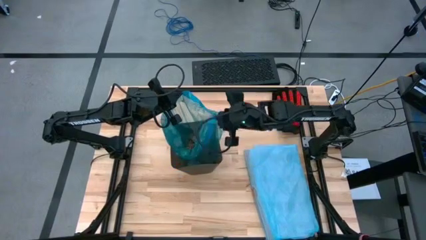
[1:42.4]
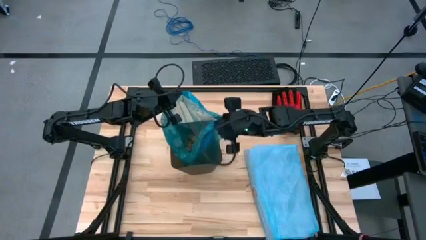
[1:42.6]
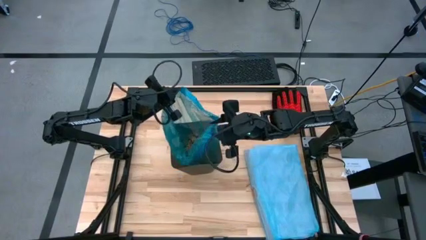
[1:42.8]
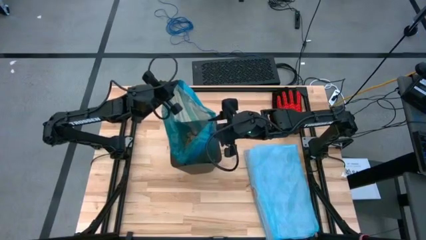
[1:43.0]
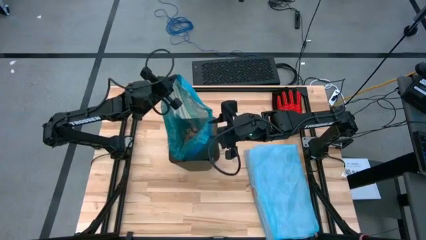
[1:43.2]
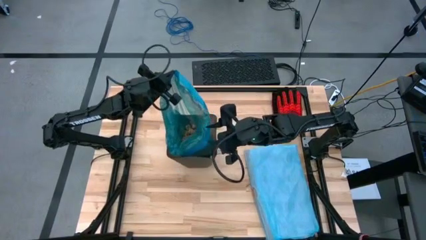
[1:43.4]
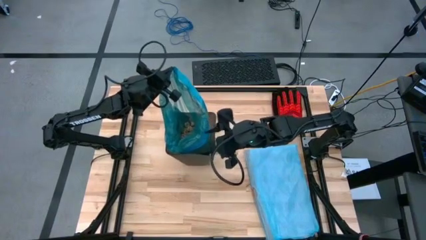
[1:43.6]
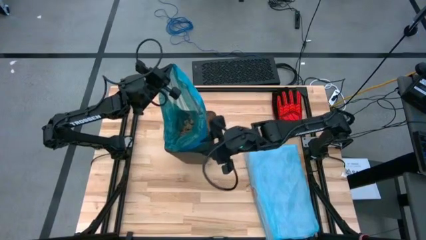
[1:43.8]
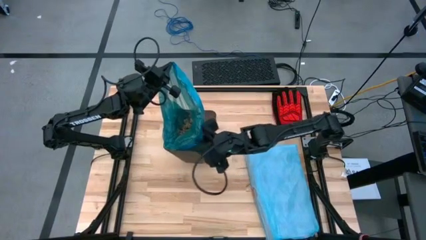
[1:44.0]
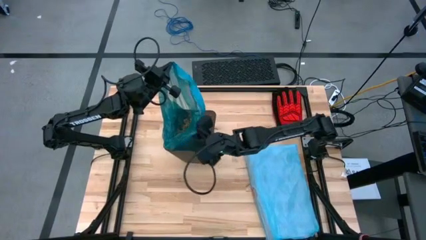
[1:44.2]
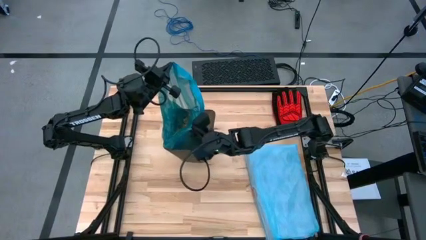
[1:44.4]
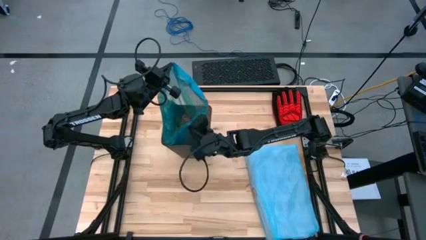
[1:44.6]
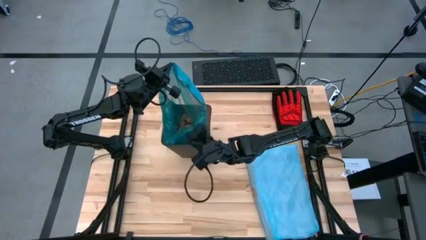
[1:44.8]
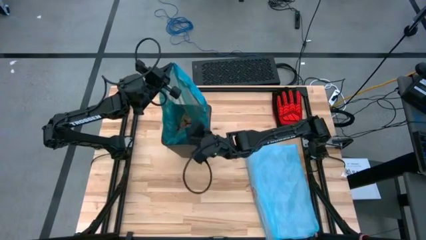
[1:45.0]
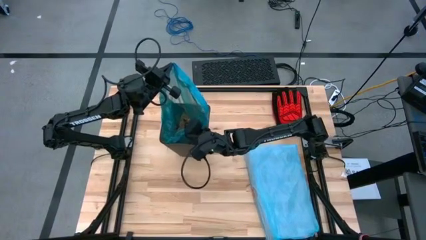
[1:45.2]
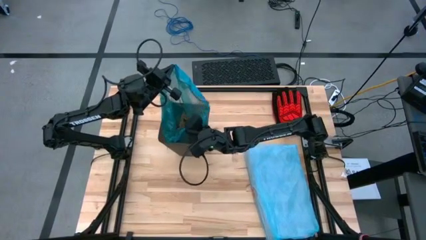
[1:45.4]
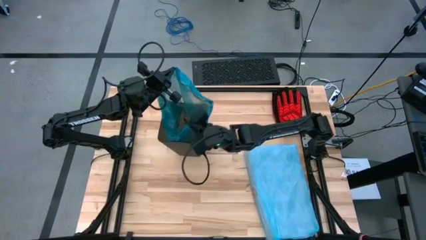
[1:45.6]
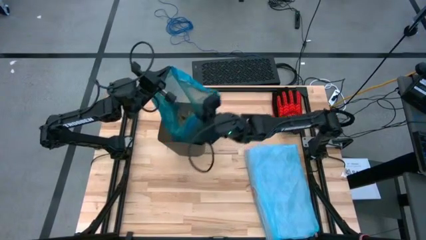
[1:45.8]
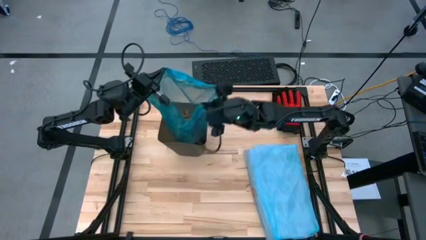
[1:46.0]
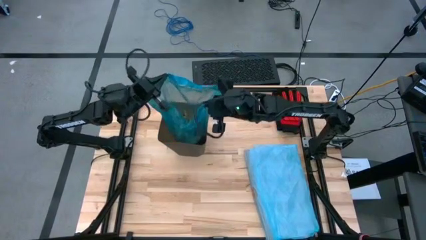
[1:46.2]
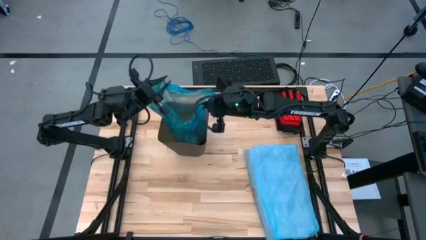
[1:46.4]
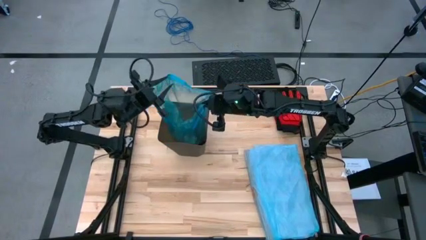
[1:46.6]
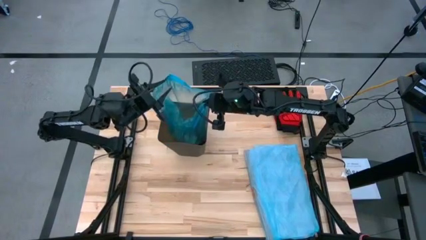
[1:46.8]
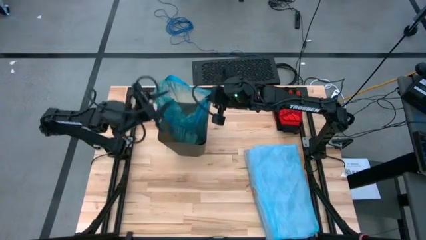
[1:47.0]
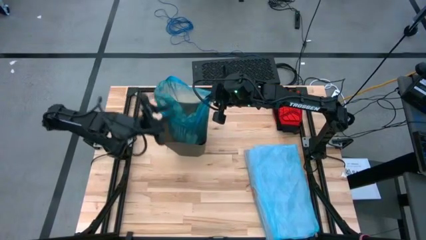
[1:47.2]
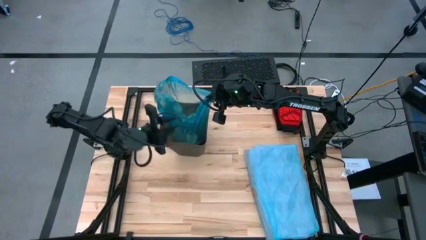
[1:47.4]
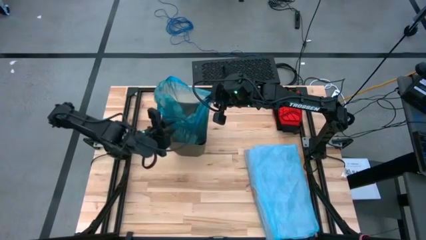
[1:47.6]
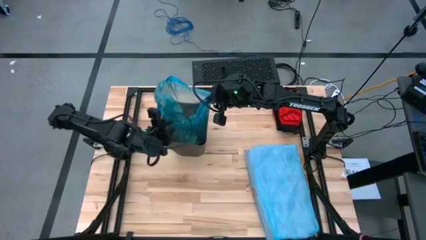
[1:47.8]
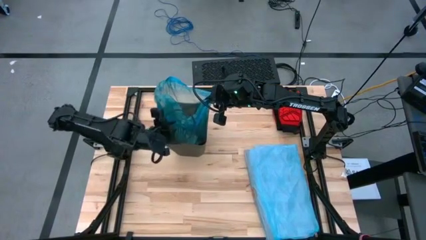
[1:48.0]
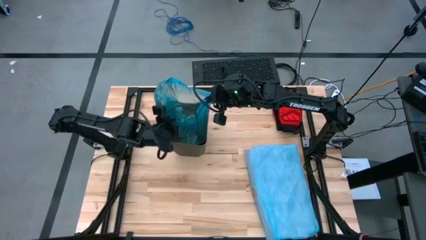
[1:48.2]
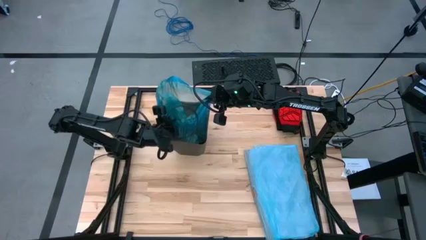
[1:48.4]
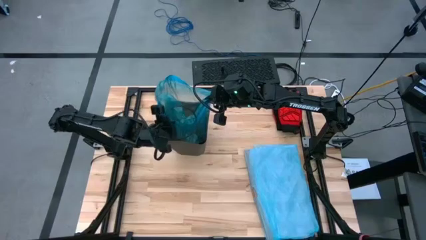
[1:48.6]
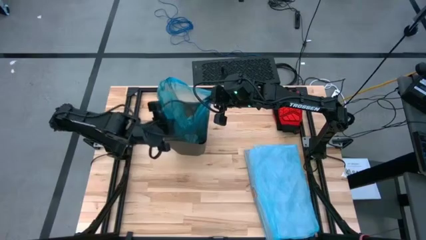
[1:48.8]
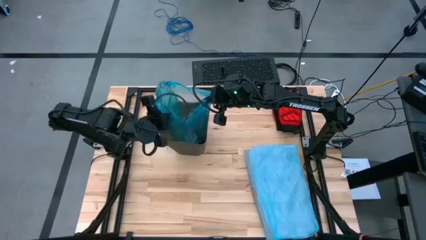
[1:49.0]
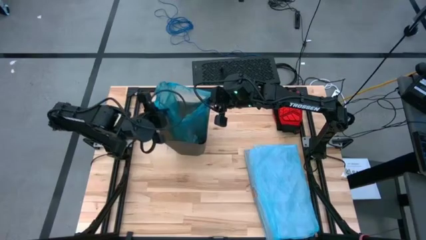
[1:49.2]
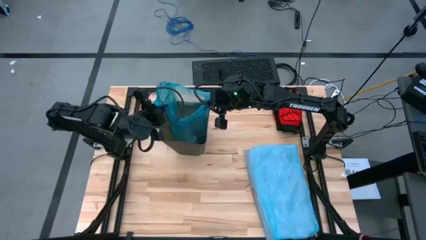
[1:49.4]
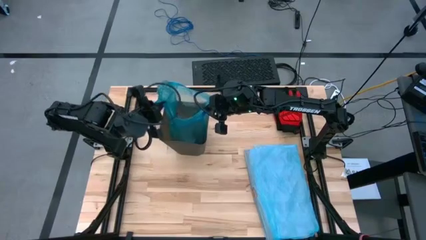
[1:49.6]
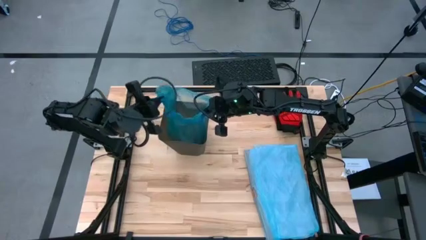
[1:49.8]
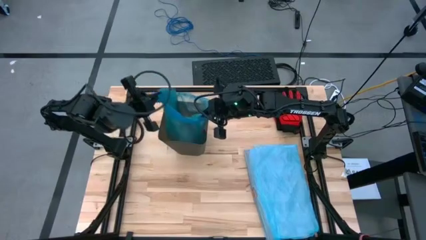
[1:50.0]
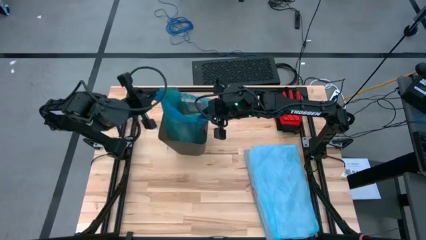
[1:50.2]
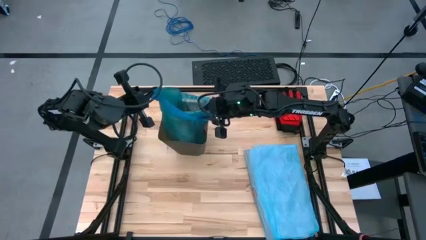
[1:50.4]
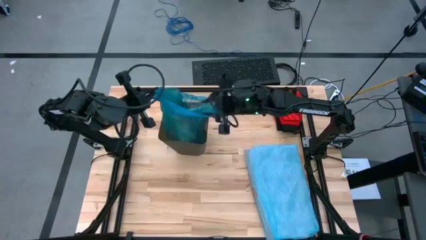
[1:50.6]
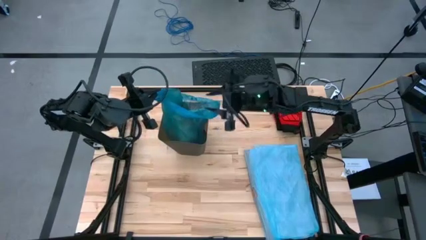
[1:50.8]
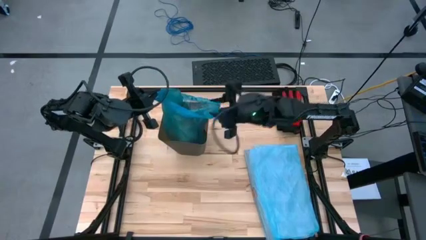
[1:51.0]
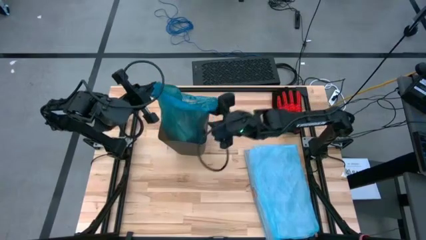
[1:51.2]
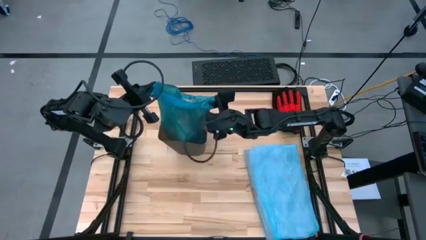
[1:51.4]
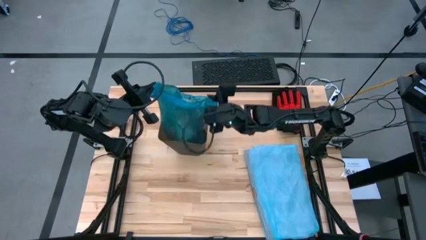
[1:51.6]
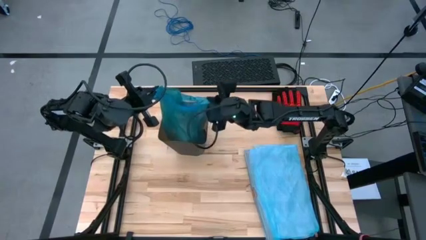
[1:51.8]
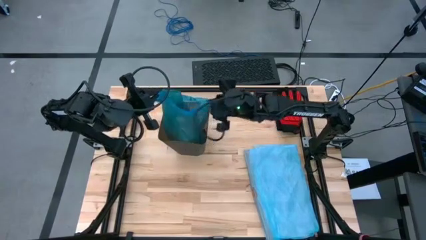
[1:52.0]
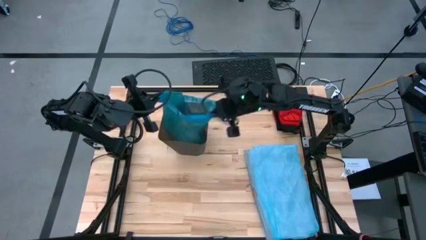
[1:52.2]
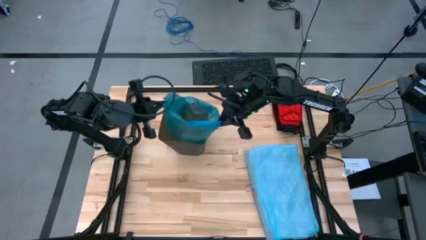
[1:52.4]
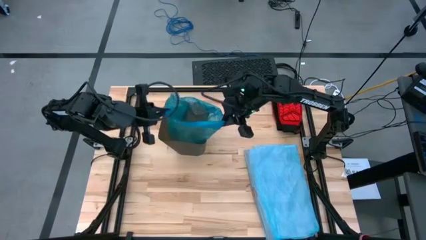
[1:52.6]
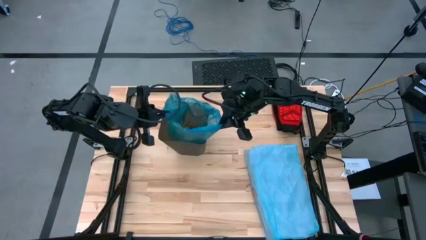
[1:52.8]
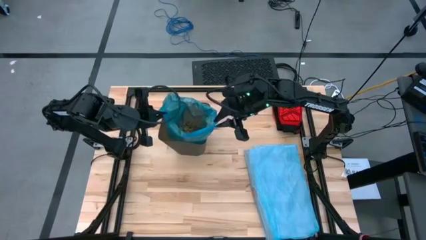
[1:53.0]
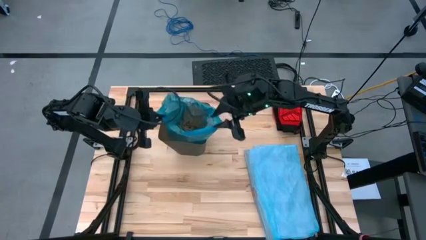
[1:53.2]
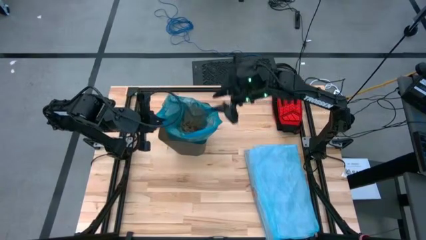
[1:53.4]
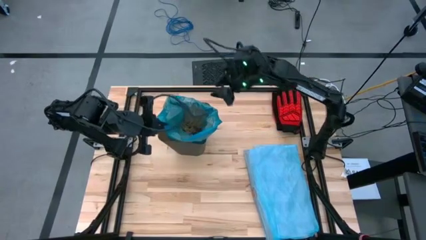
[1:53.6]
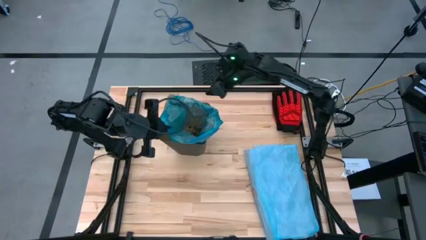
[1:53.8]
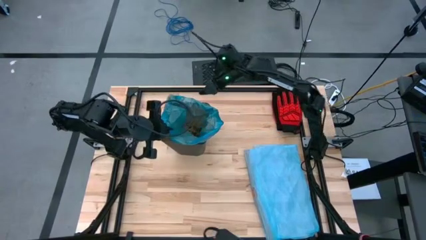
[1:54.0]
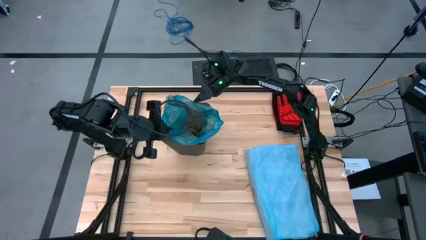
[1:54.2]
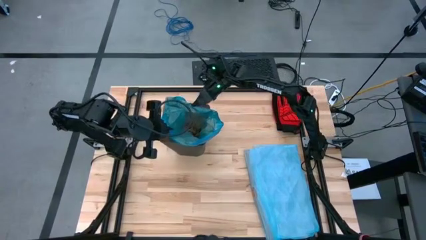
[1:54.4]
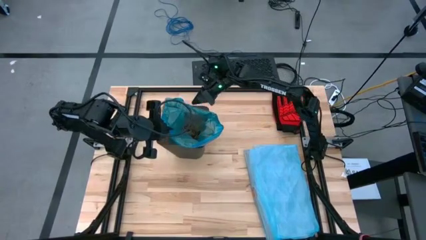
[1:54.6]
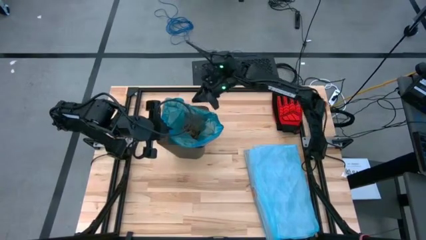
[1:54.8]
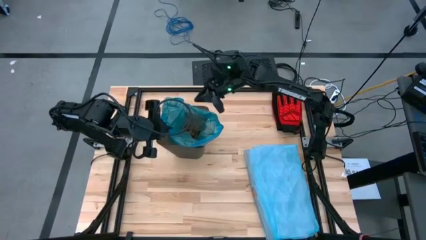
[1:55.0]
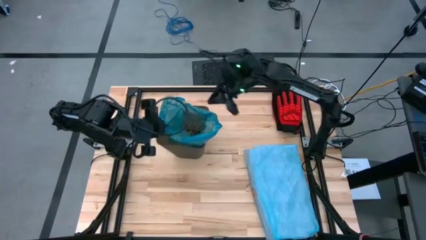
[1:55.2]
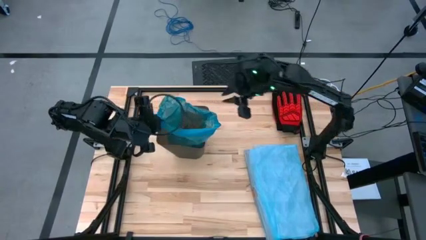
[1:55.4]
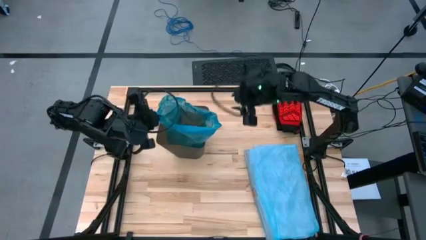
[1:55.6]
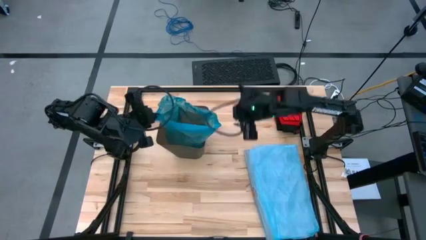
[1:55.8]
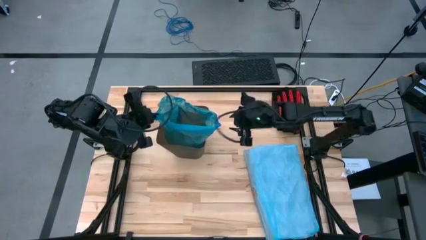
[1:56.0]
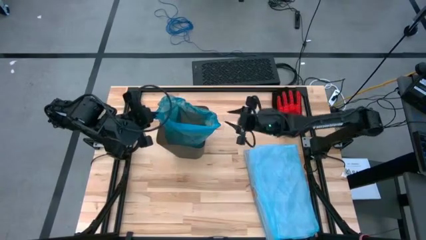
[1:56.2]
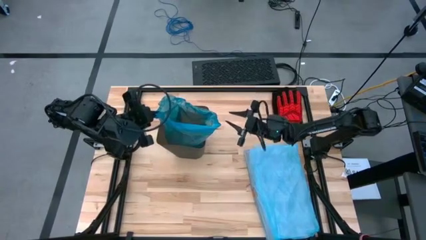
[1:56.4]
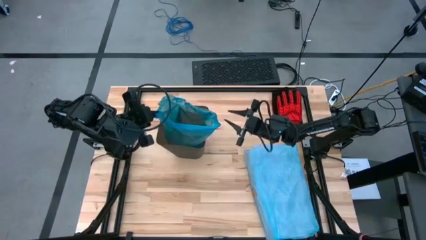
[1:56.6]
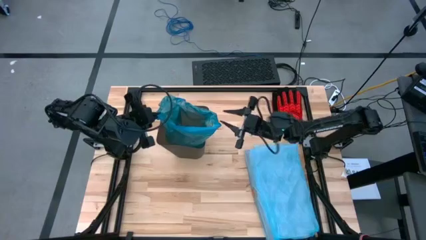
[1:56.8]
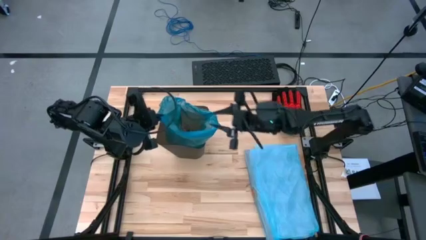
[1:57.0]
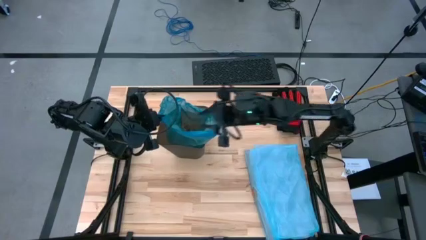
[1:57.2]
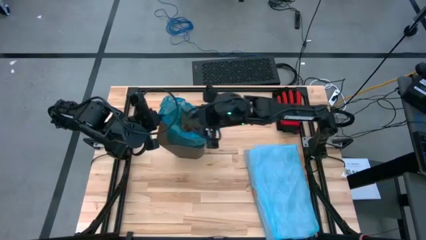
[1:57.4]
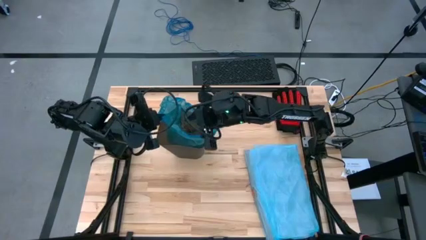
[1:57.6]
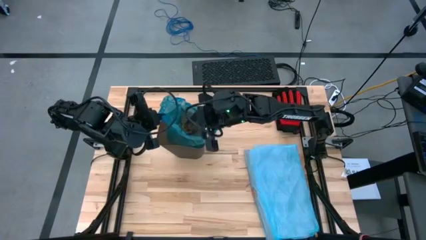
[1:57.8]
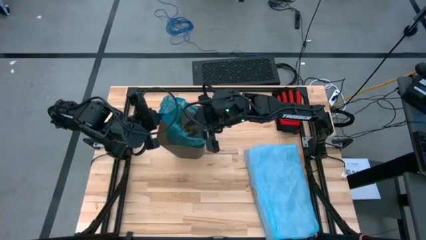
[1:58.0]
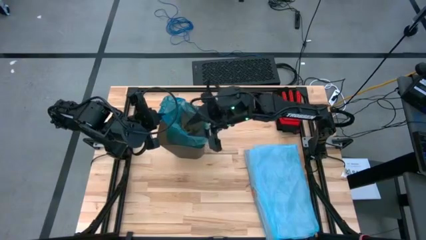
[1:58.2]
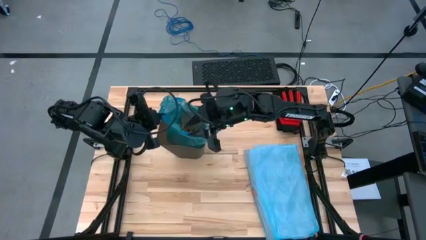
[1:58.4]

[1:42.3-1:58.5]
Task: place trash/remove bag and relplace
Remove the trash bag from the bin
